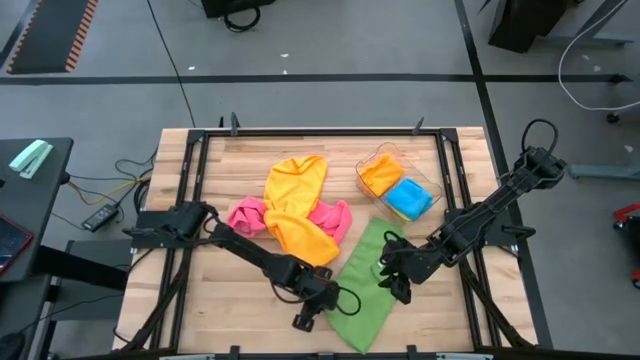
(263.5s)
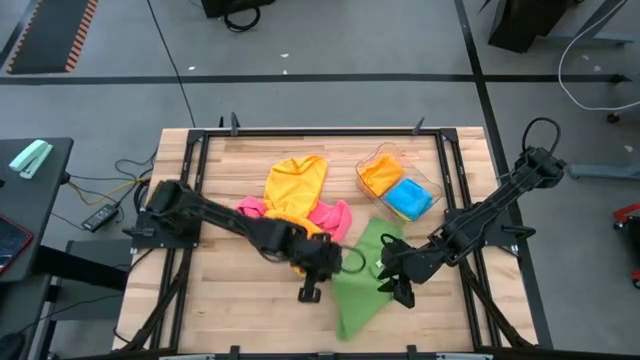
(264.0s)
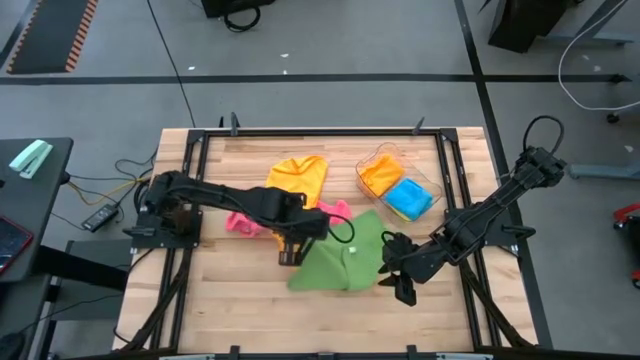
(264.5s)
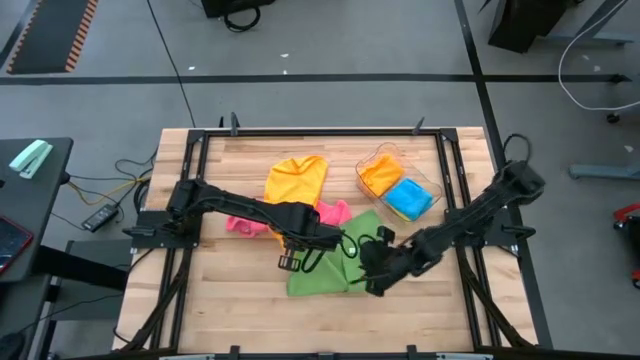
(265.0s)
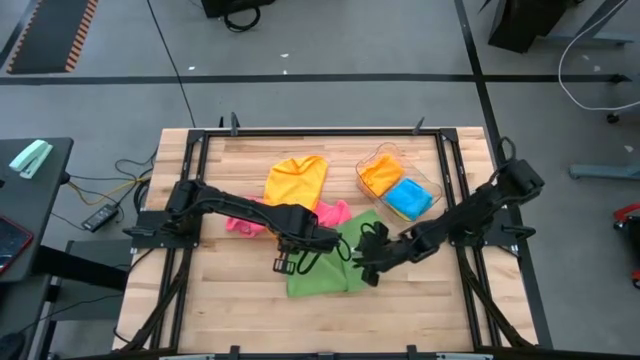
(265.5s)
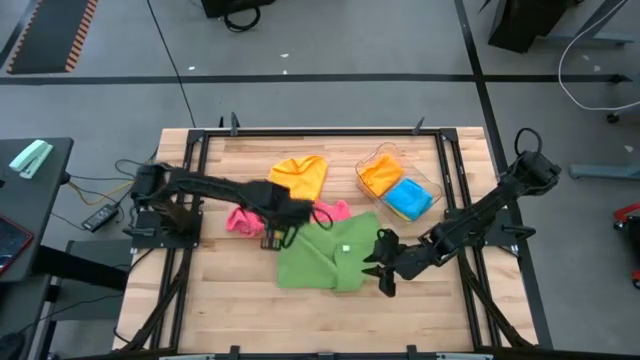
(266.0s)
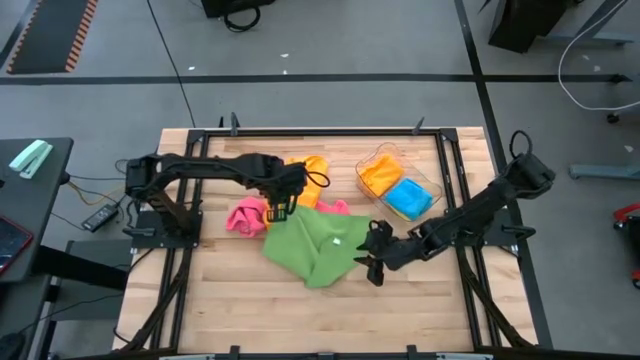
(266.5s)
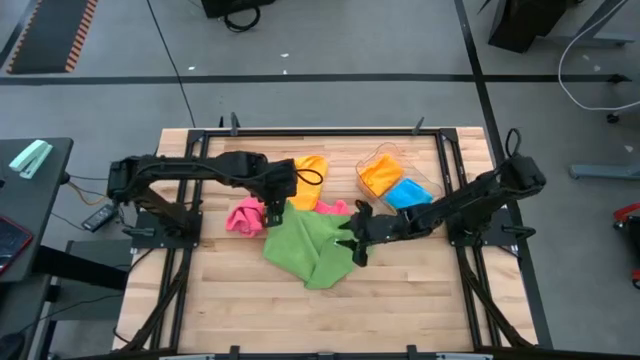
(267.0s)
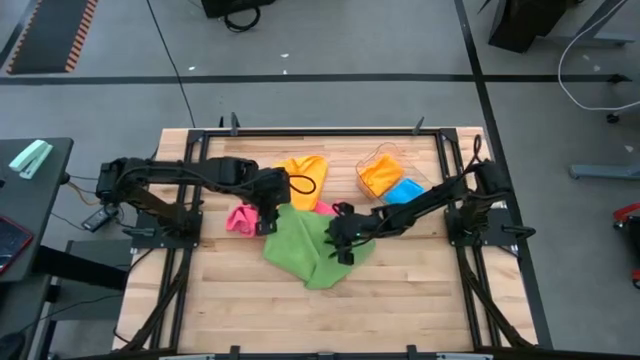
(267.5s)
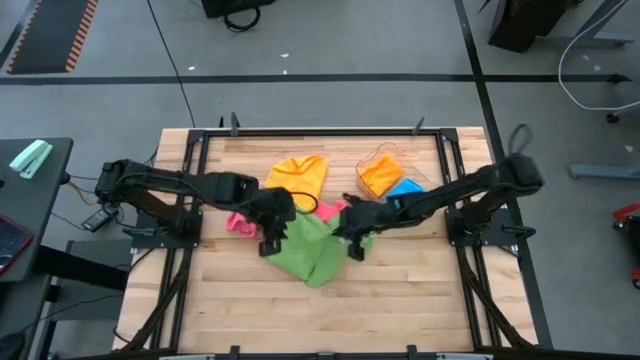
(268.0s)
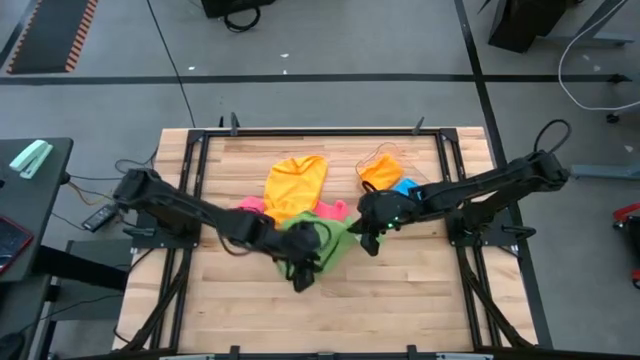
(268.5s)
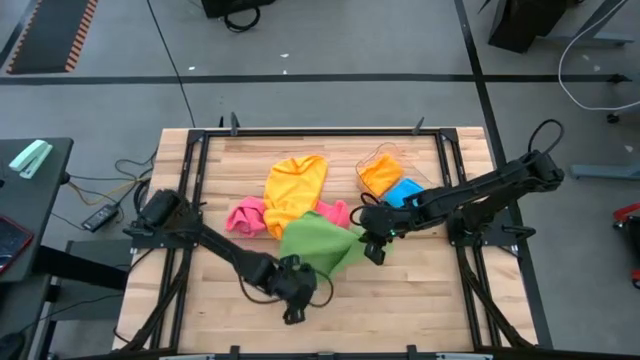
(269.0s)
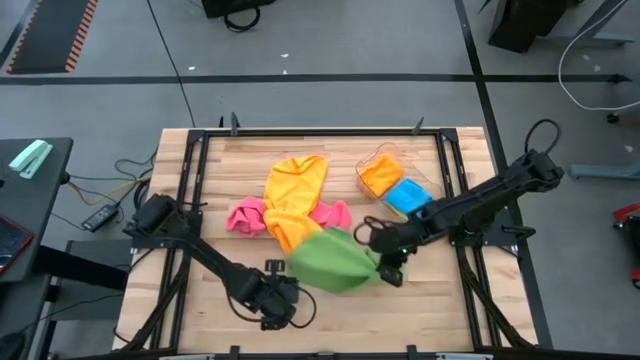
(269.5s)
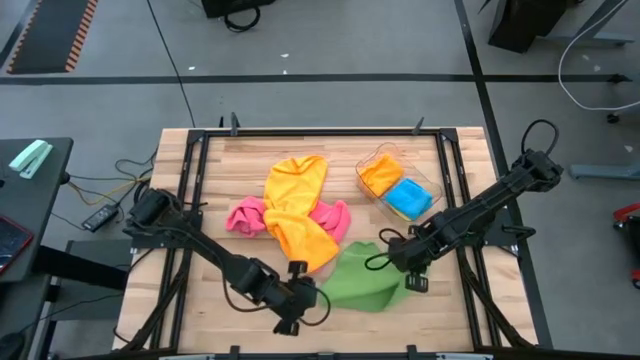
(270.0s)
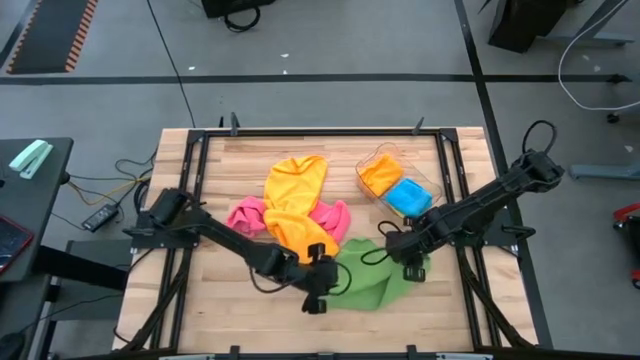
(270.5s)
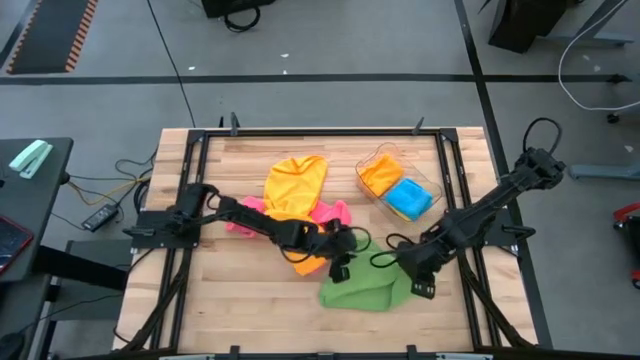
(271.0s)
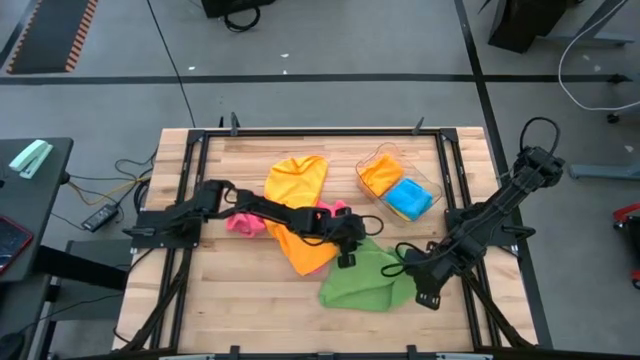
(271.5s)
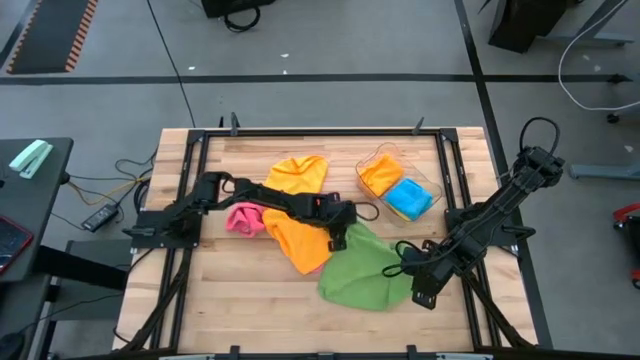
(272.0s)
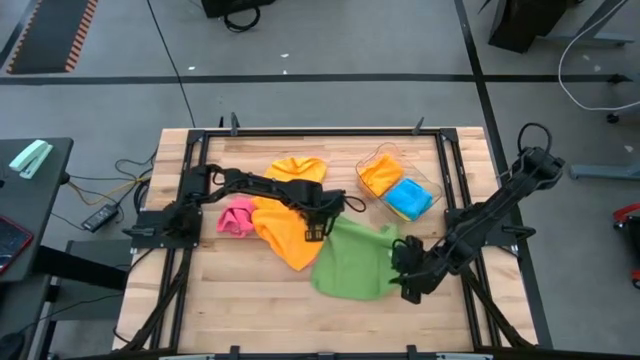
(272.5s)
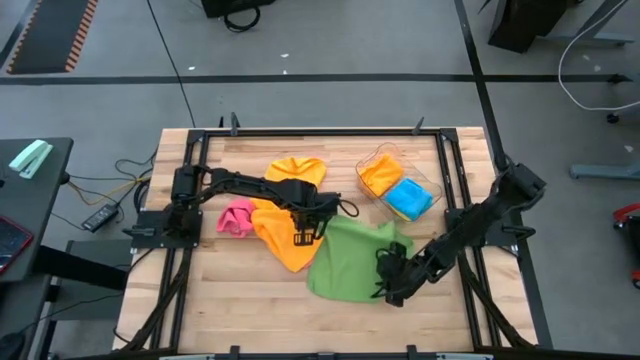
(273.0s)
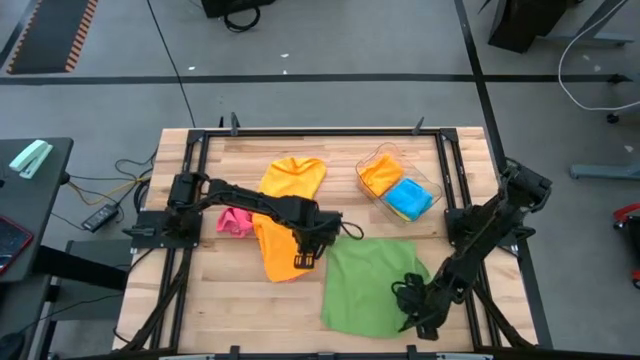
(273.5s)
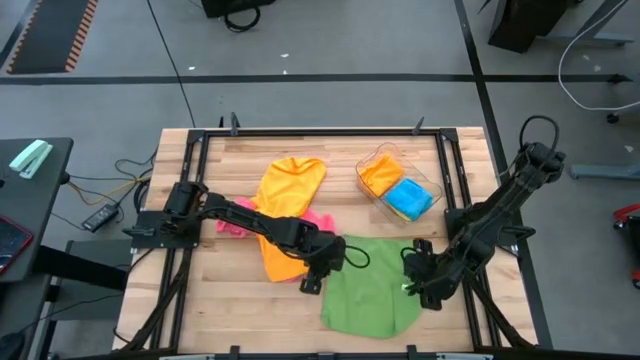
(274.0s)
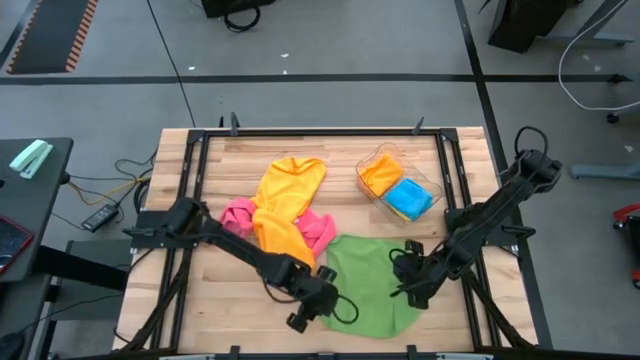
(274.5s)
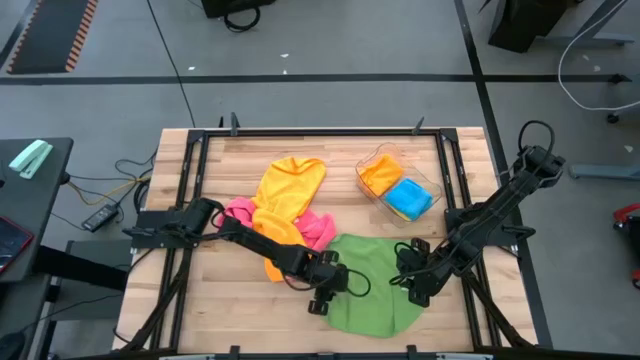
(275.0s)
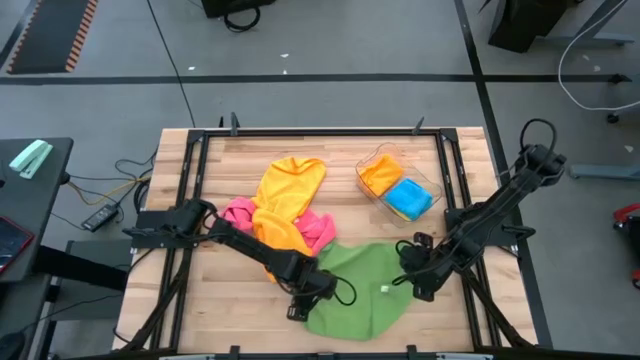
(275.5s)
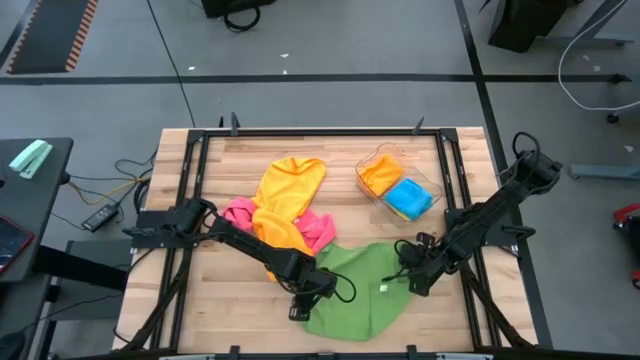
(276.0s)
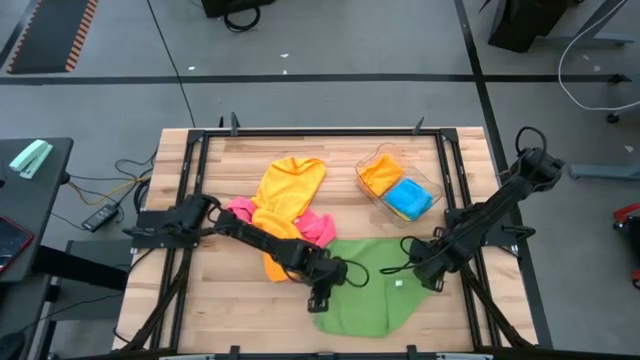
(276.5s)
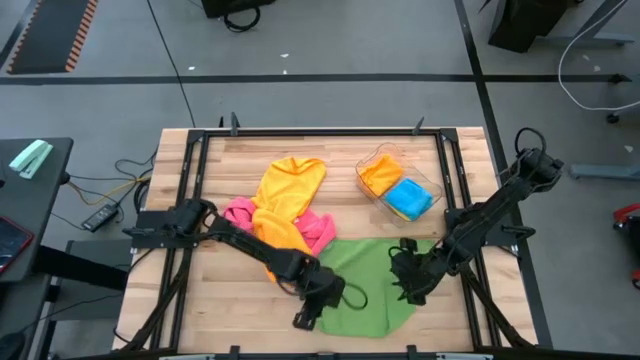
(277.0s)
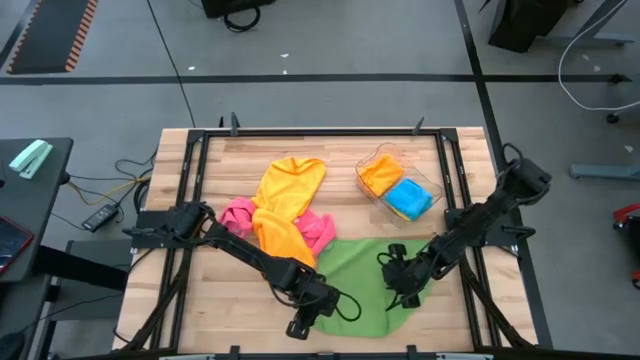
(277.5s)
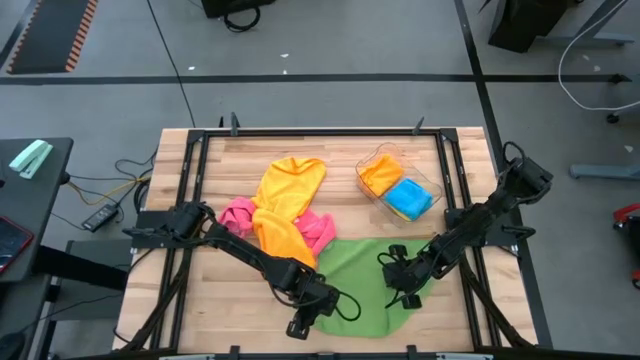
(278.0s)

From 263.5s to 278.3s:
Task: Fold microfiber towels
Fold the green towel

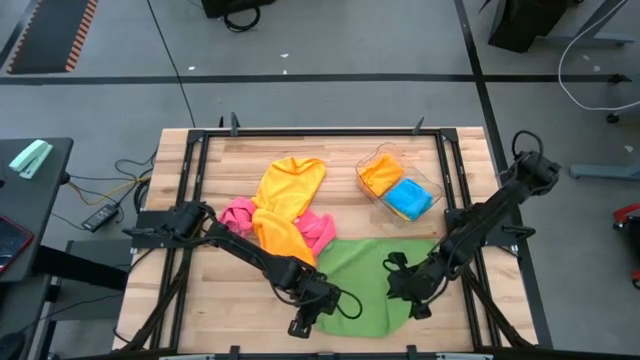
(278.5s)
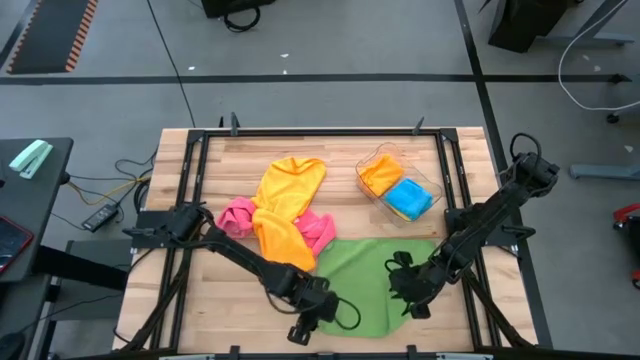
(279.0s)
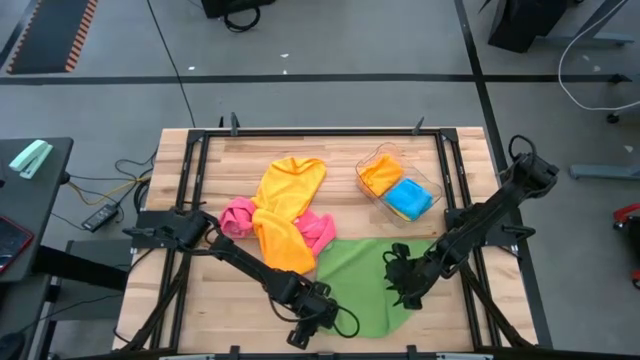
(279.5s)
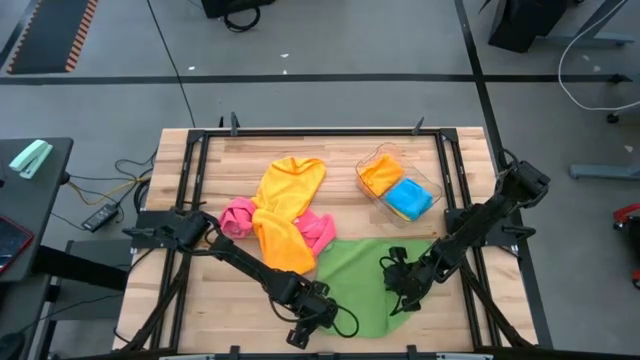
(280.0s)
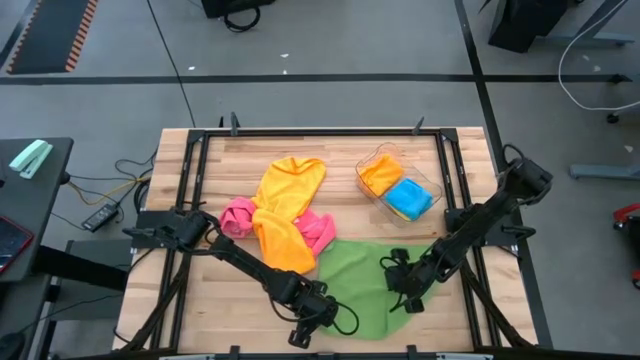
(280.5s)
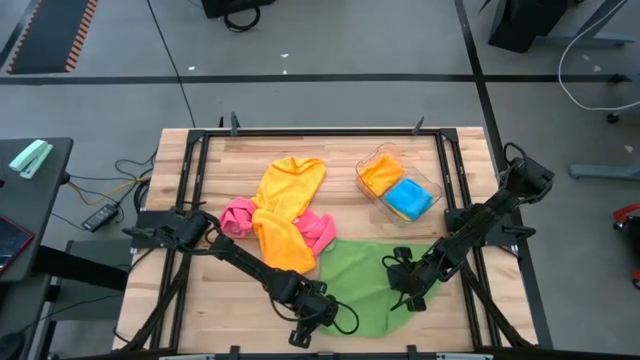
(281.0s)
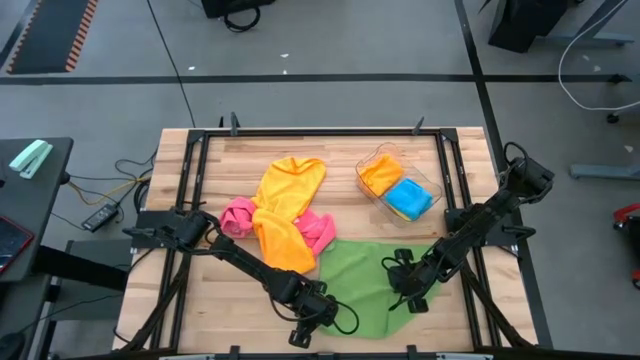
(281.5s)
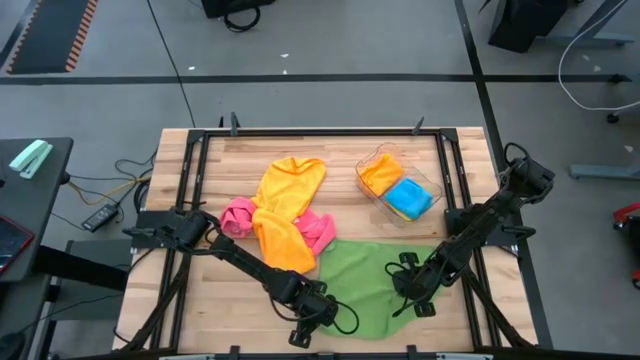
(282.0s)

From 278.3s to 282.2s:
Fold the green towel

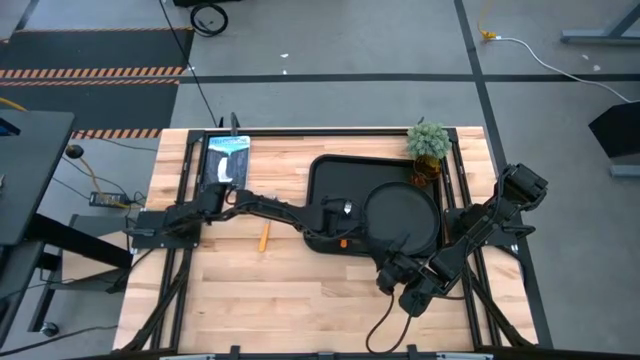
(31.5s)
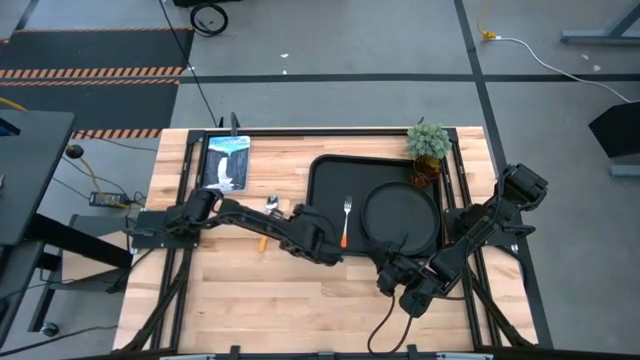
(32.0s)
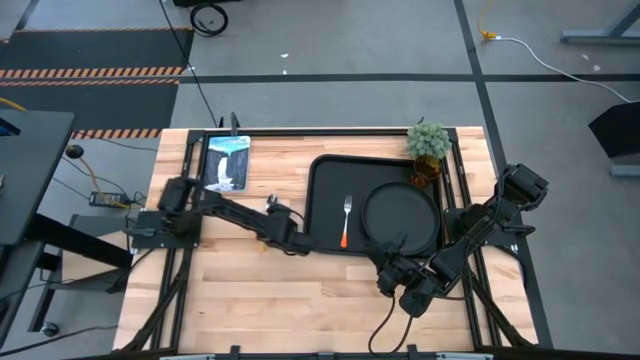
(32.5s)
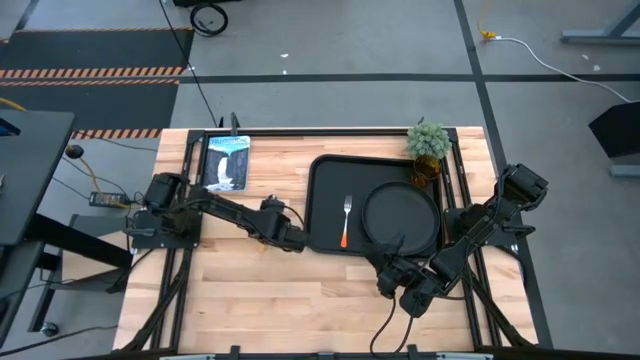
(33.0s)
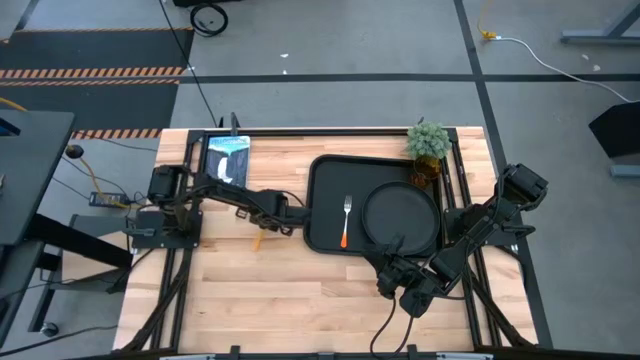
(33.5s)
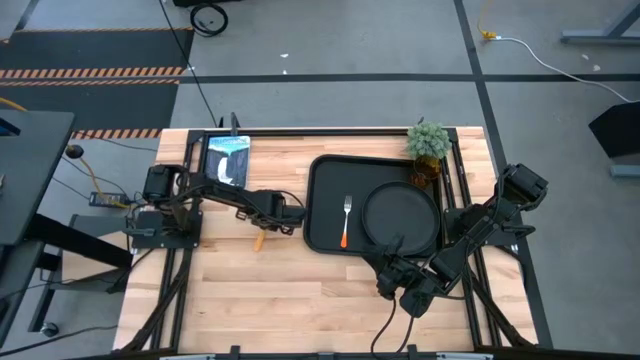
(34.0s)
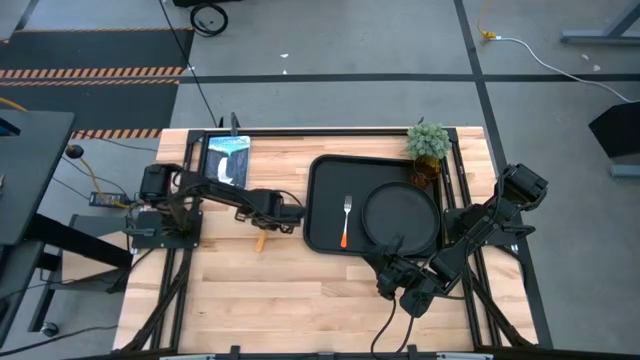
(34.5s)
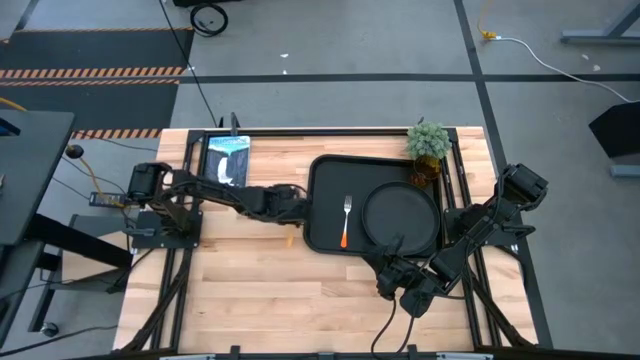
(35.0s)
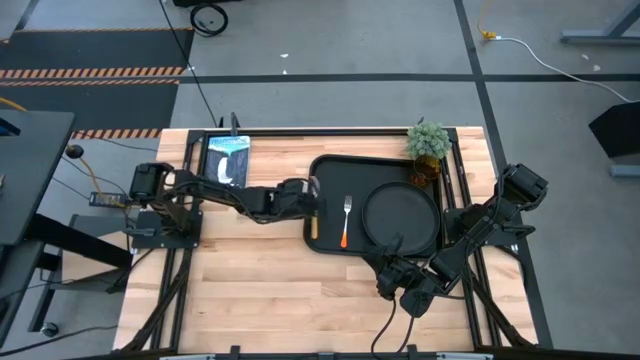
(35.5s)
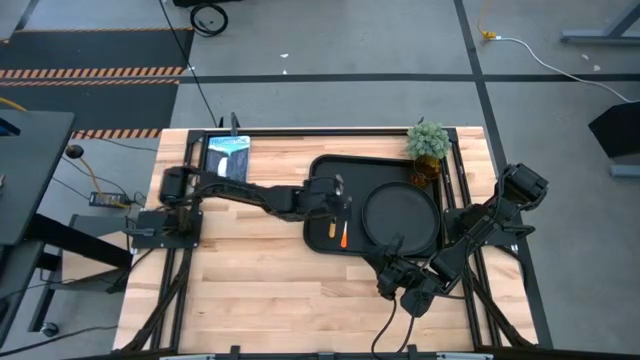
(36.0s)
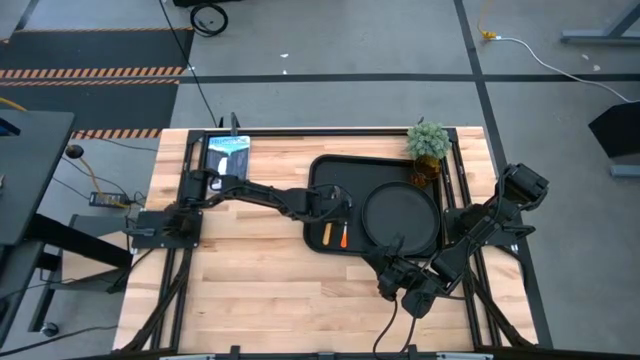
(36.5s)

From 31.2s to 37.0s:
Task: Pick and place plate/cup/fork/spoon on tray
Put the yellow spoon to the left of the orange fork on the black tray
